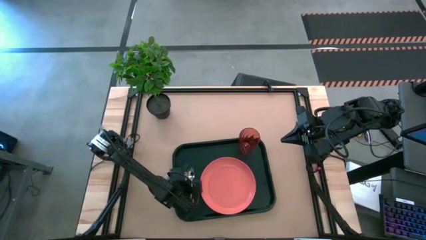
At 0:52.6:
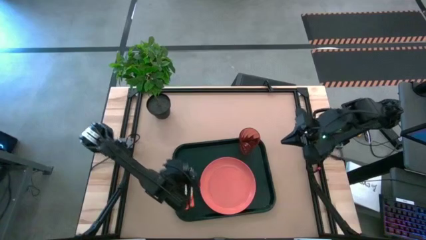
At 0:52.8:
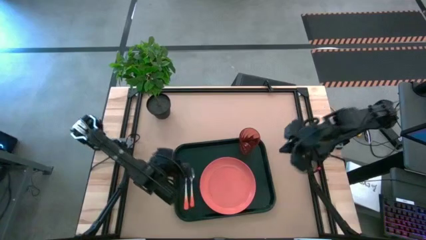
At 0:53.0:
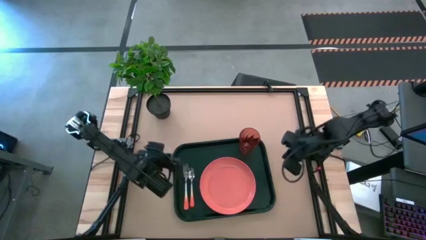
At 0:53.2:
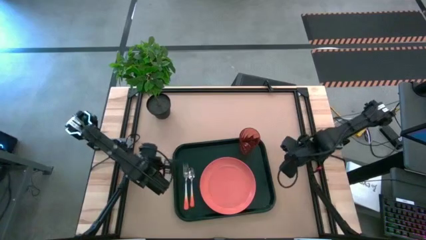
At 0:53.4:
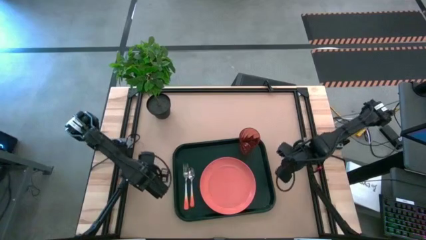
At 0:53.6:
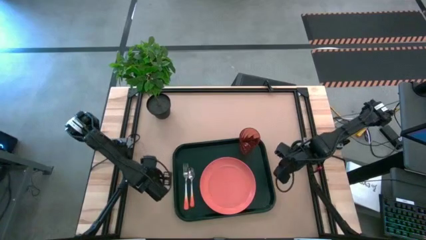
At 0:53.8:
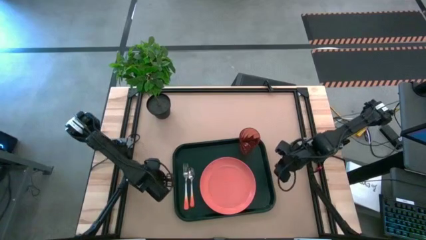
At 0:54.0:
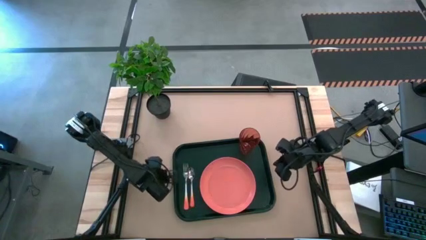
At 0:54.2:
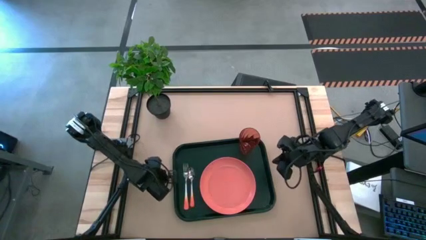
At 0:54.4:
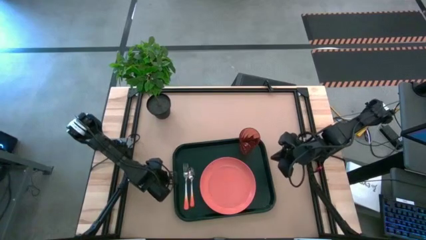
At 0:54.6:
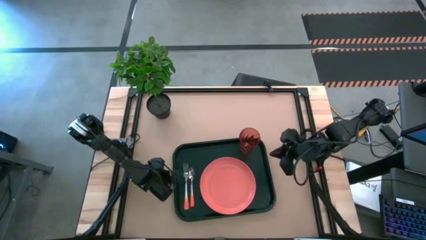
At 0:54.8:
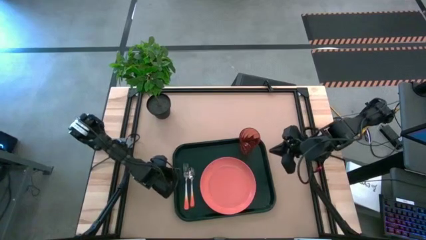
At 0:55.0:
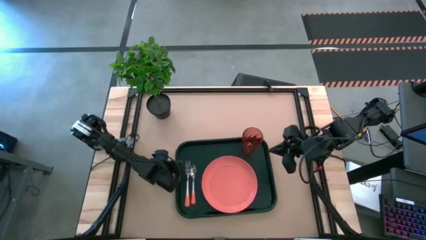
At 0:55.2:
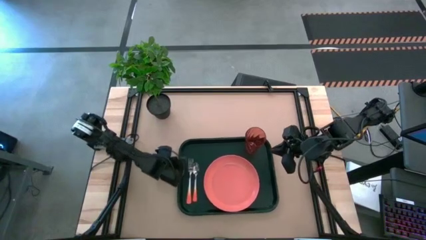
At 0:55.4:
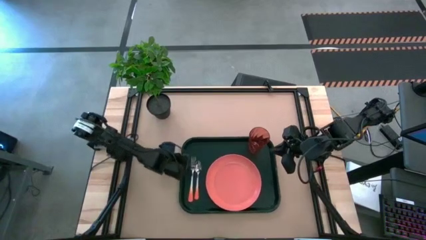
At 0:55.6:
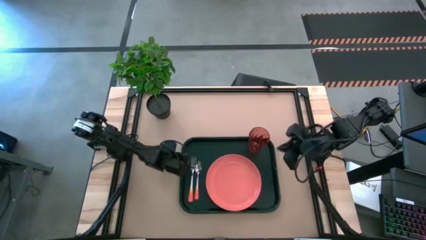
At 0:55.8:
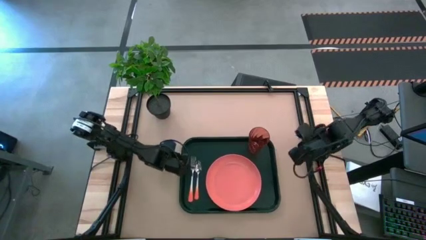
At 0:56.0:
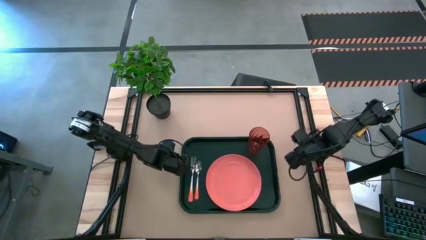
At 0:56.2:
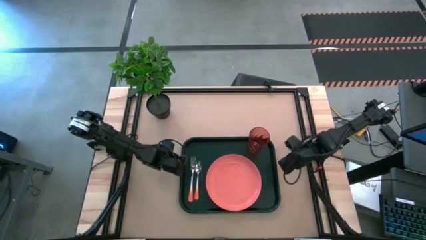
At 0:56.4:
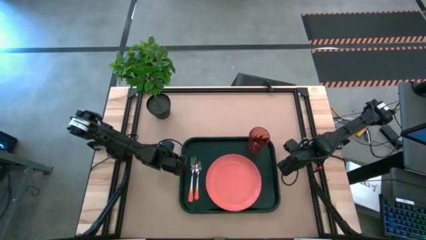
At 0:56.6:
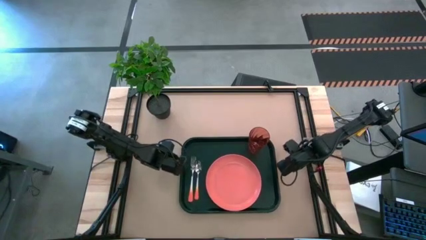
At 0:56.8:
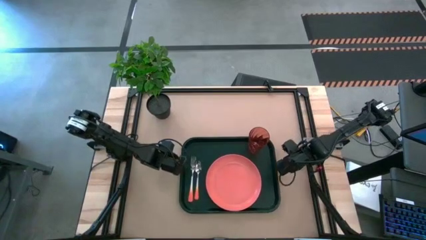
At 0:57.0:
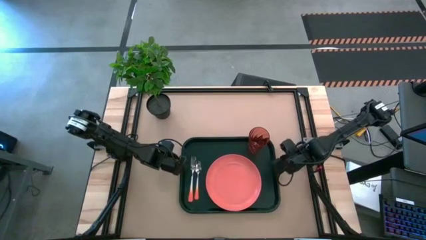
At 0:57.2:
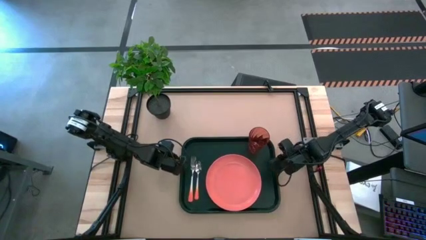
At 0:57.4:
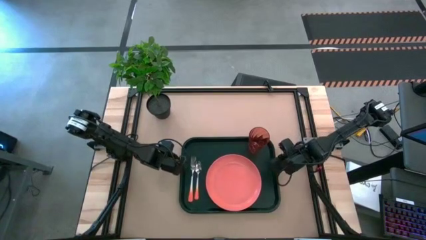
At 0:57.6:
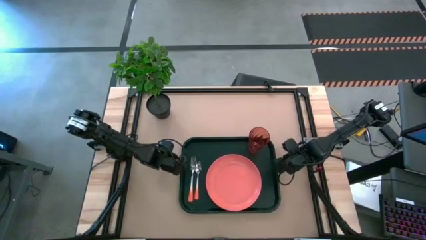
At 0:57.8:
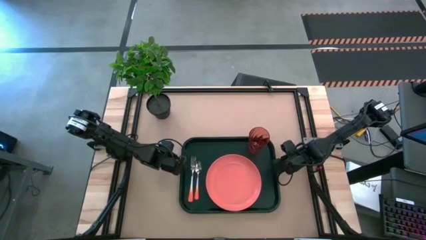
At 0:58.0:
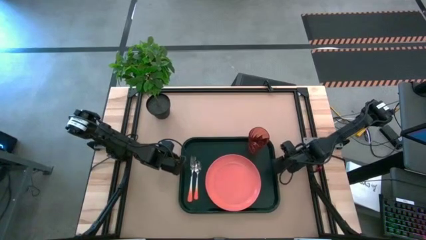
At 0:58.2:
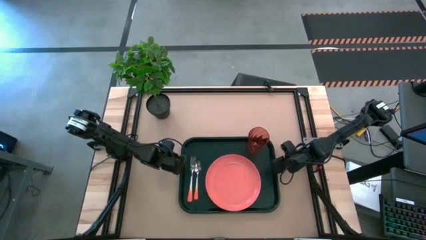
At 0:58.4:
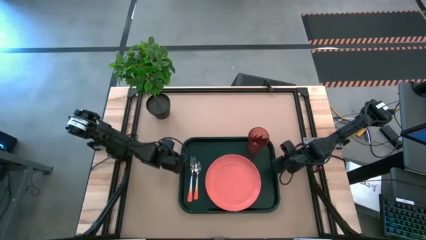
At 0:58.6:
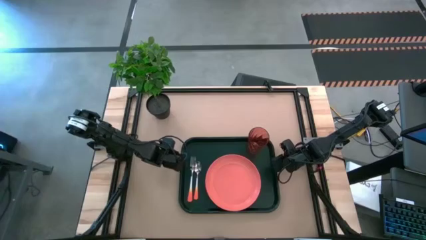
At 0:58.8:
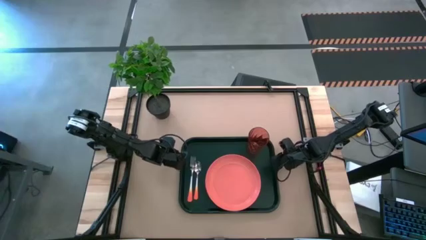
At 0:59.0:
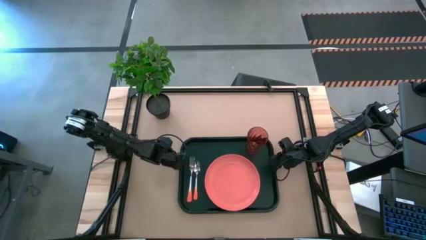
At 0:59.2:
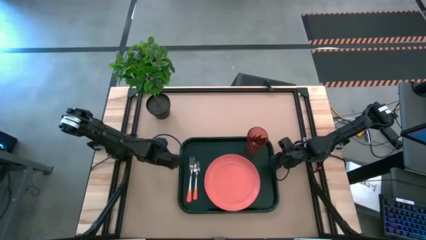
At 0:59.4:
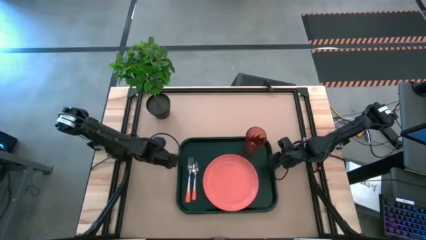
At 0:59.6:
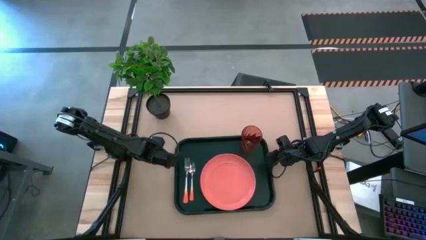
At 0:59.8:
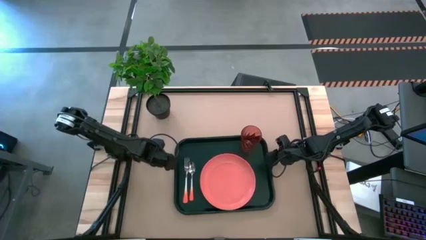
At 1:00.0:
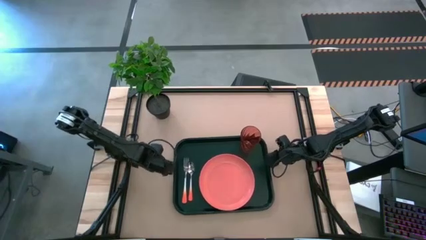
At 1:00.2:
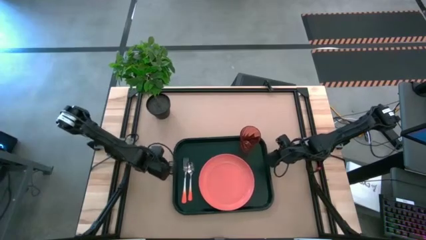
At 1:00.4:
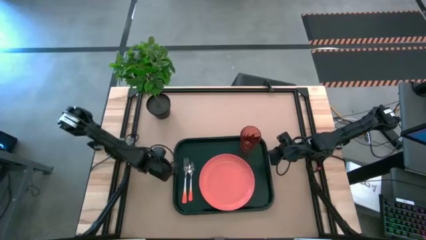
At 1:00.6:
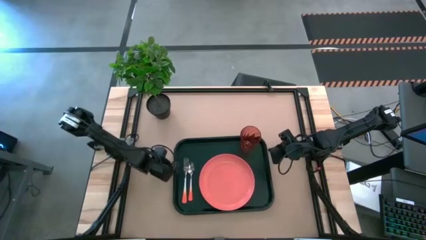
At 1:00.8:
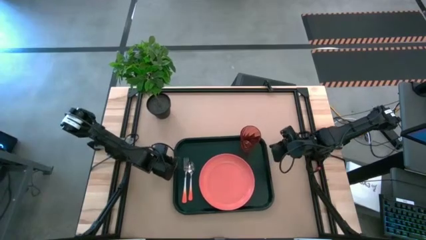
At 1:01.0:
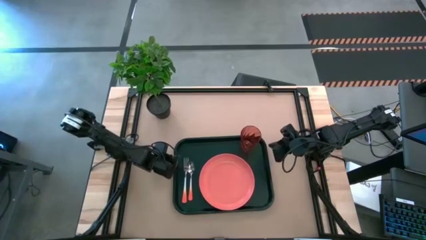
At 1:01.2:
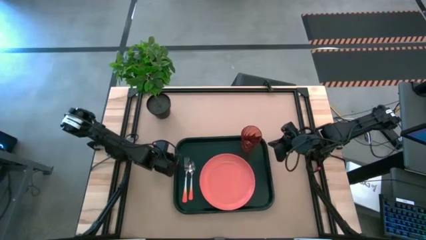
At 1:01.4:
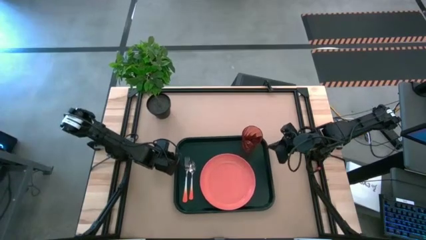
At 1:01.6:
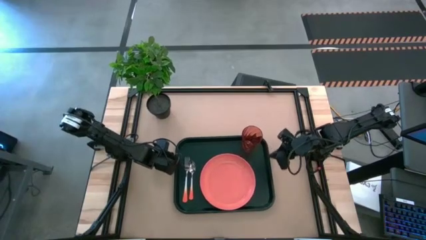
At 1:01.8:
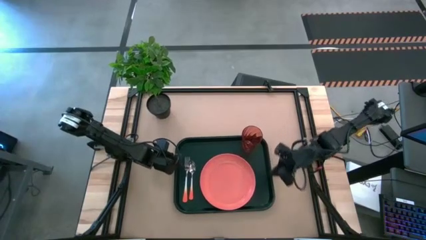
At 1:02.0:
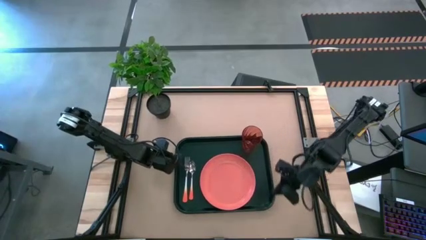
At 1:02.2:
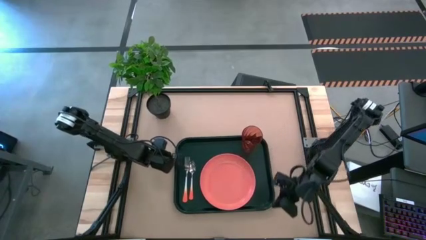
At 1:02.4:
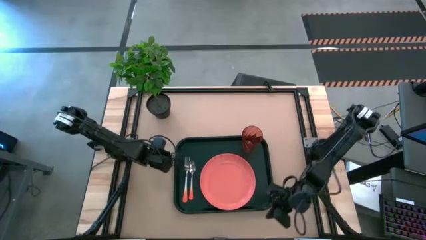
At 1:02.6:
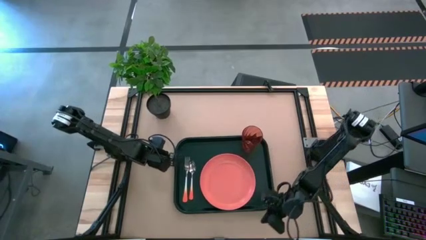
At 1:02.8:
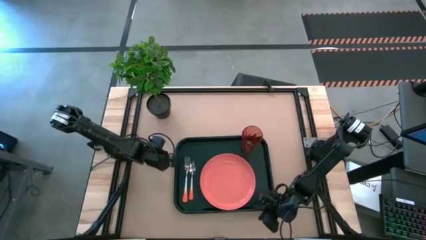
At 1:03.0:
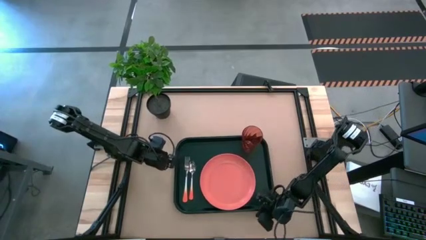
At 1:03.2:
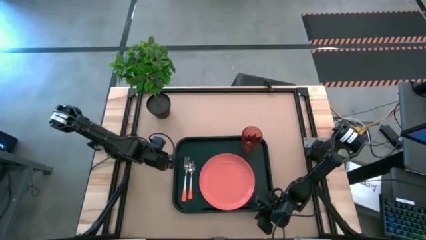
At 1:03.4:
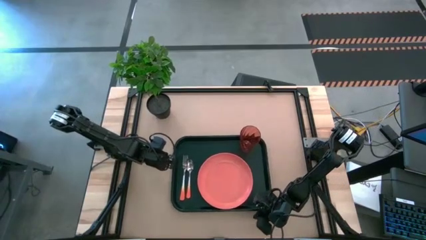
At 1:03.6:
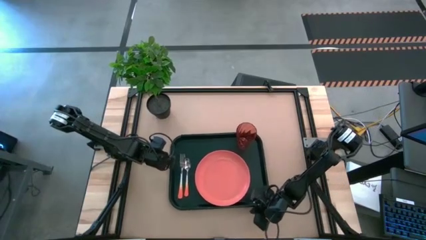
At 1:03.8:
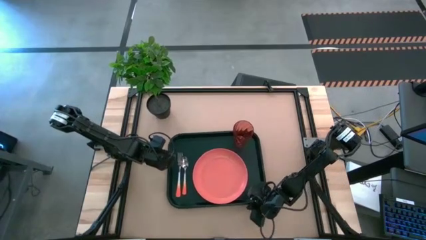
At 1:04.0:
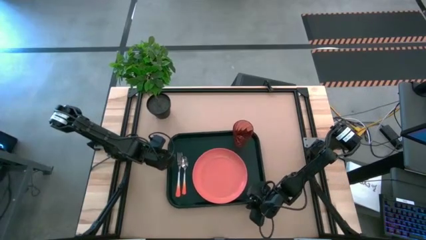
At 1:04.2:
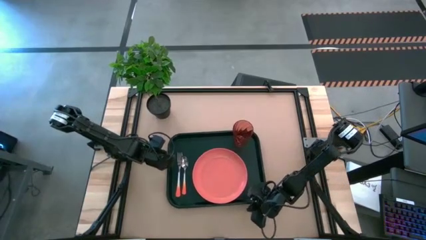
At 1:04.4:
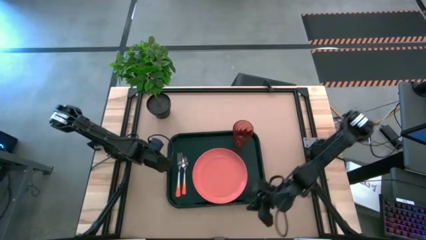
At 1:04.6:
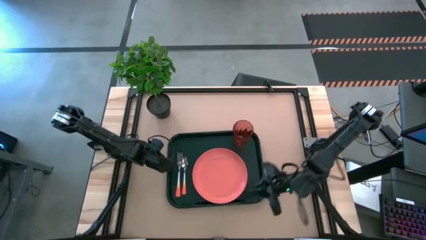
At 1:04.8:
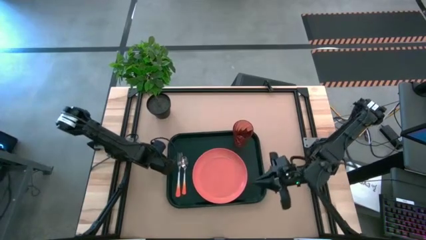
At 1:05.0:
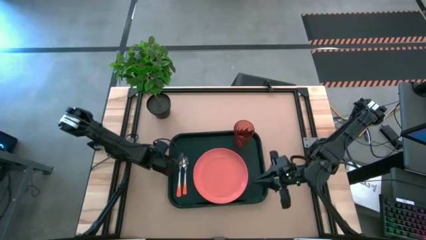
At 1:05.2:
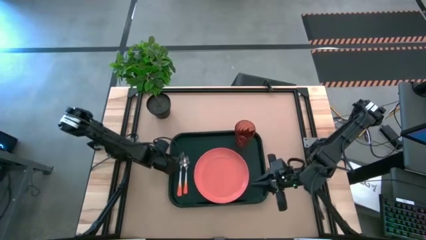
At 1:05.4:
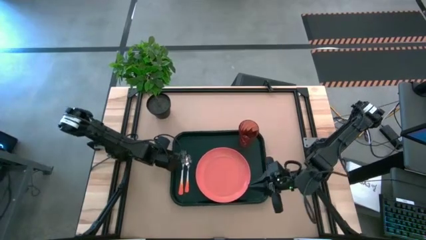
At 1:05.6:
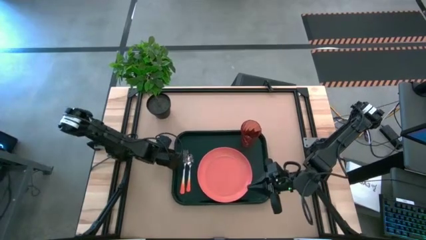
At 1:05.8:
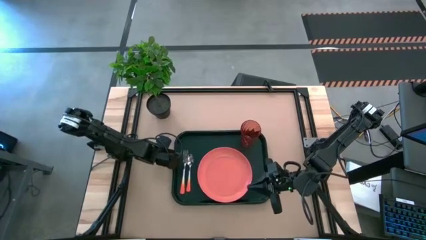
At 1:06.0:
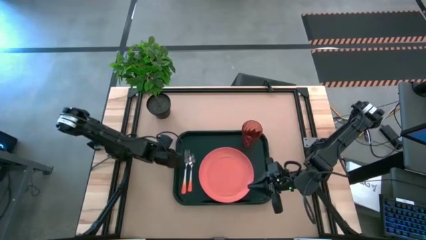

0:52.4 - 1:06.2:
Task: Pick and place plate/cup/fork/spoon on tray
Adjust the black tray
